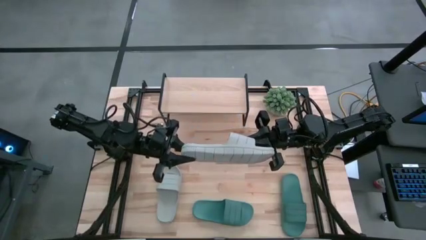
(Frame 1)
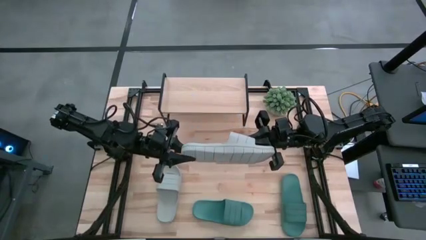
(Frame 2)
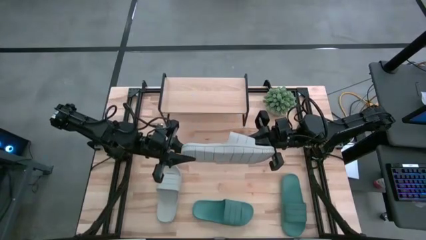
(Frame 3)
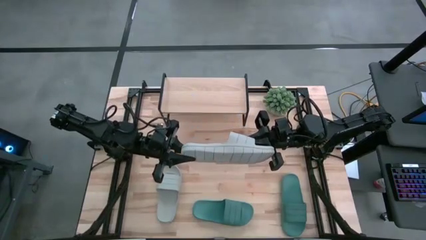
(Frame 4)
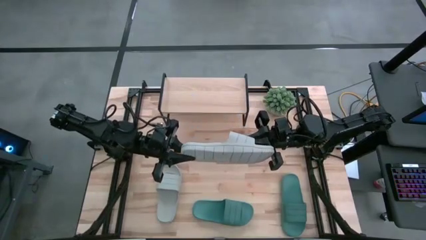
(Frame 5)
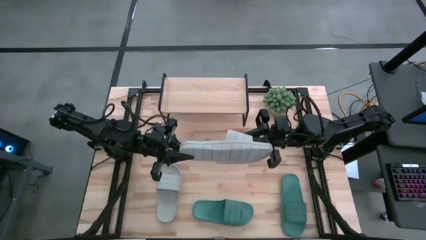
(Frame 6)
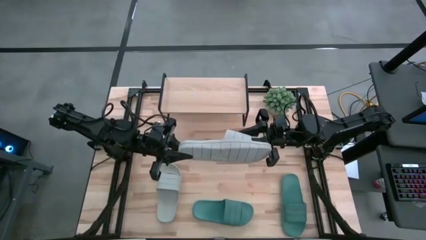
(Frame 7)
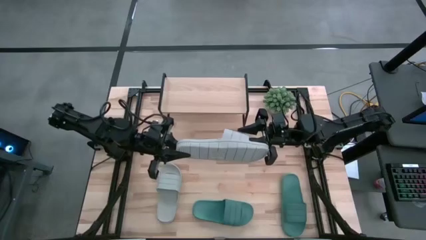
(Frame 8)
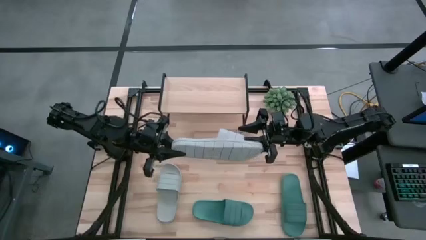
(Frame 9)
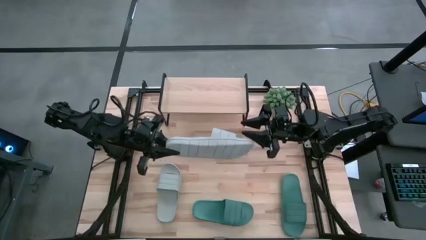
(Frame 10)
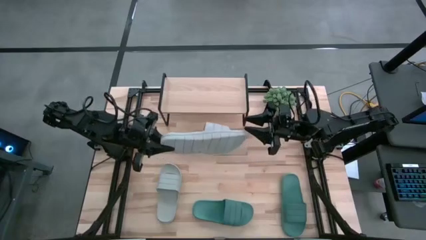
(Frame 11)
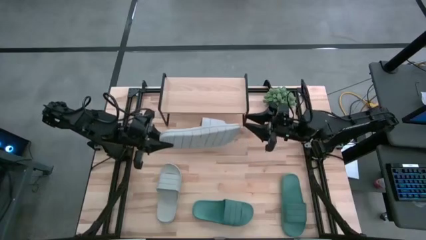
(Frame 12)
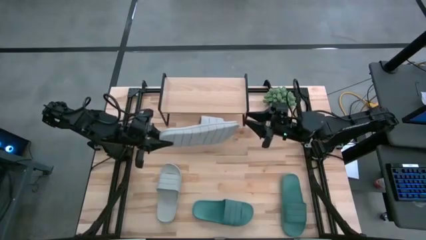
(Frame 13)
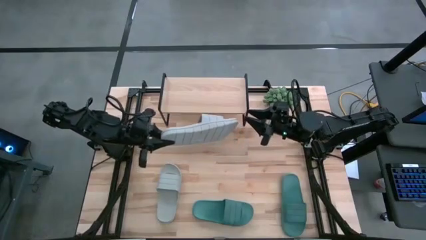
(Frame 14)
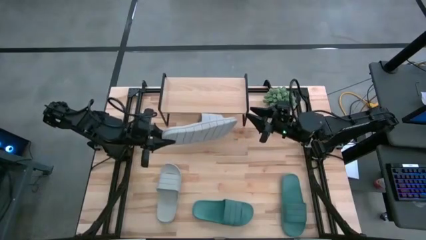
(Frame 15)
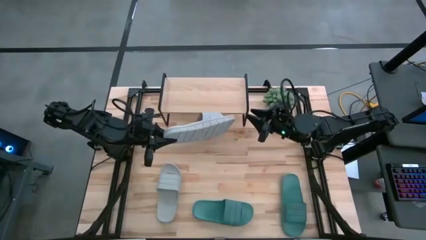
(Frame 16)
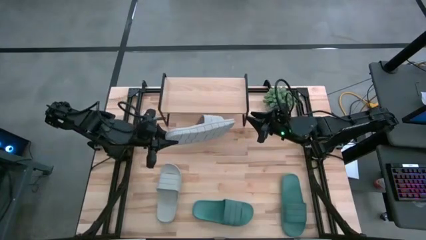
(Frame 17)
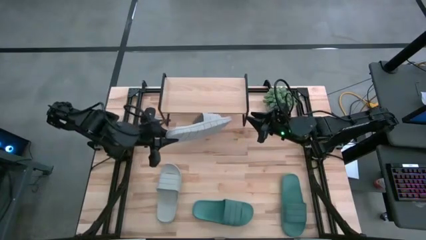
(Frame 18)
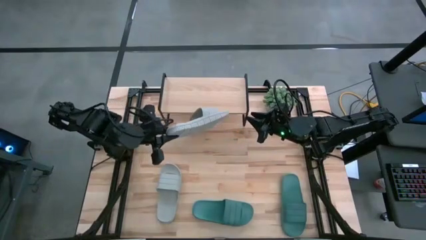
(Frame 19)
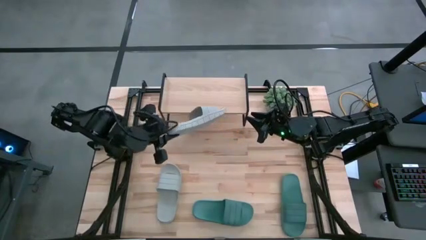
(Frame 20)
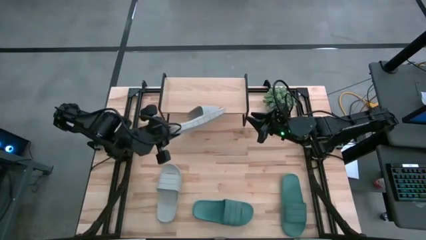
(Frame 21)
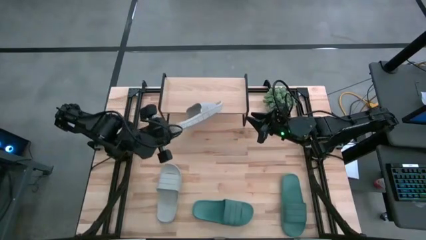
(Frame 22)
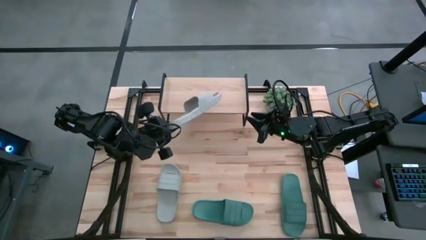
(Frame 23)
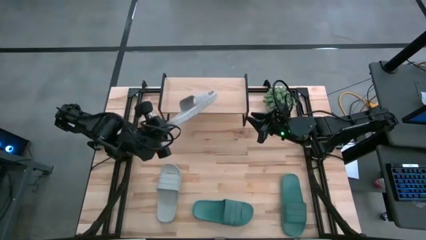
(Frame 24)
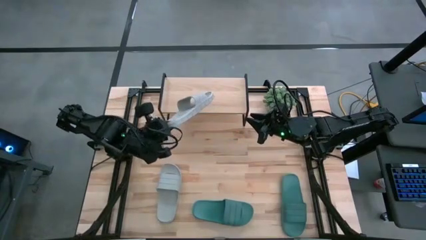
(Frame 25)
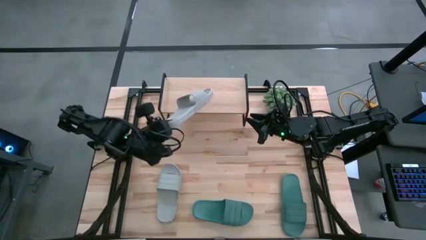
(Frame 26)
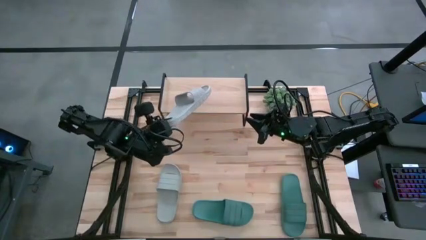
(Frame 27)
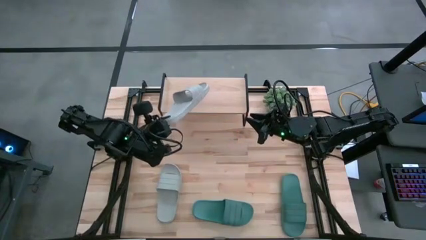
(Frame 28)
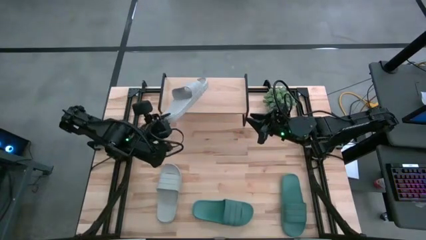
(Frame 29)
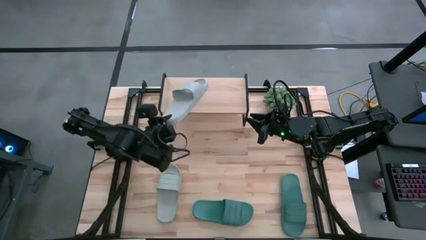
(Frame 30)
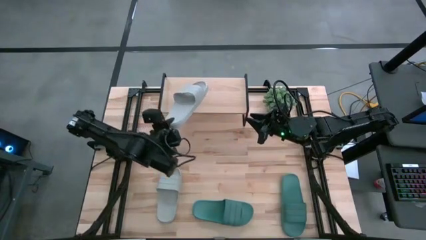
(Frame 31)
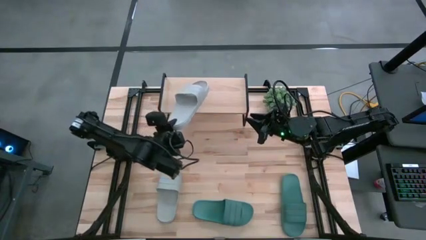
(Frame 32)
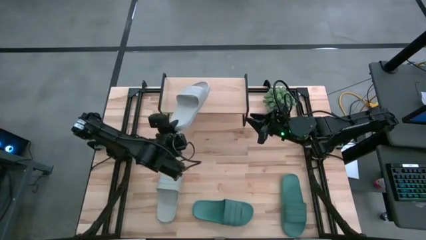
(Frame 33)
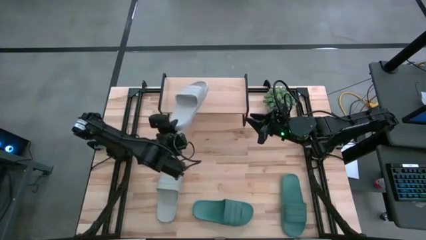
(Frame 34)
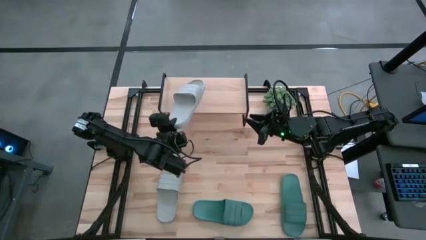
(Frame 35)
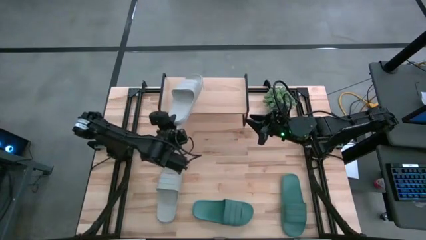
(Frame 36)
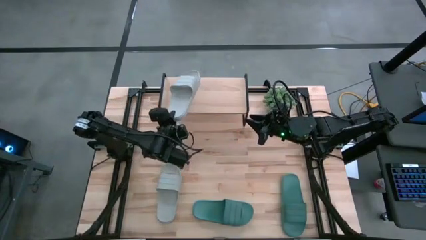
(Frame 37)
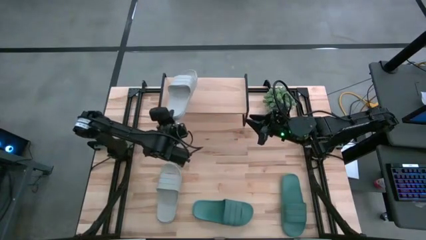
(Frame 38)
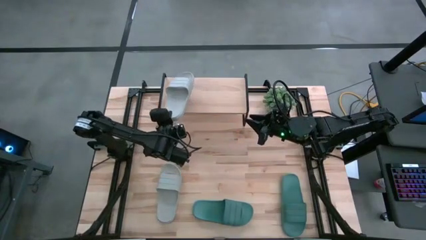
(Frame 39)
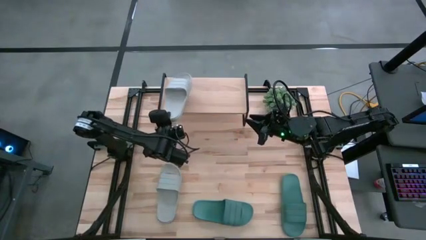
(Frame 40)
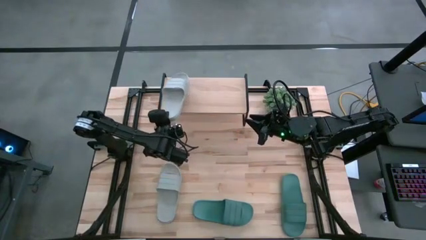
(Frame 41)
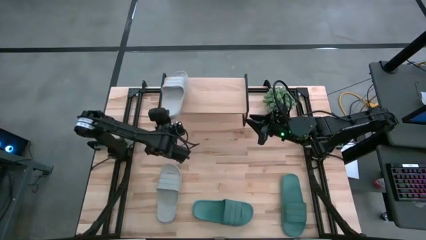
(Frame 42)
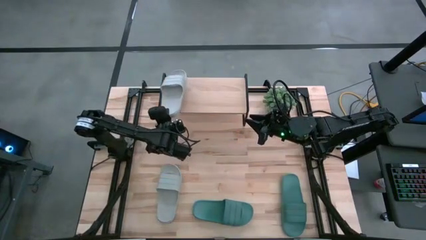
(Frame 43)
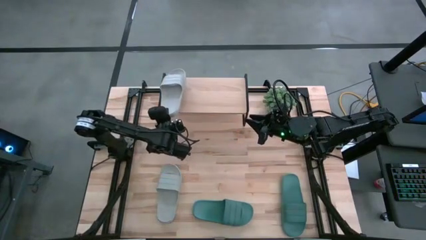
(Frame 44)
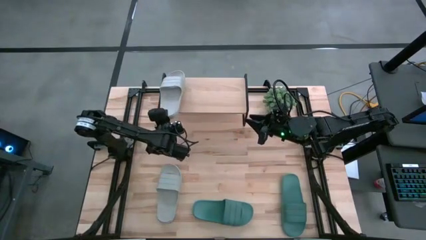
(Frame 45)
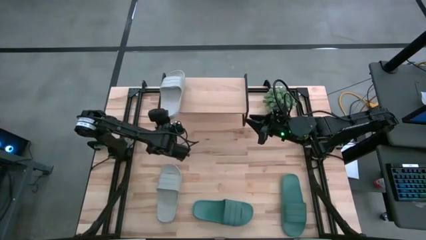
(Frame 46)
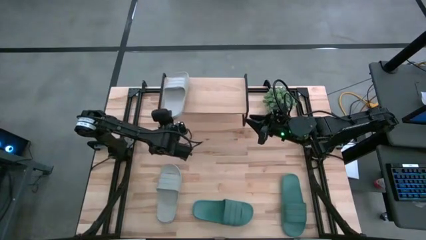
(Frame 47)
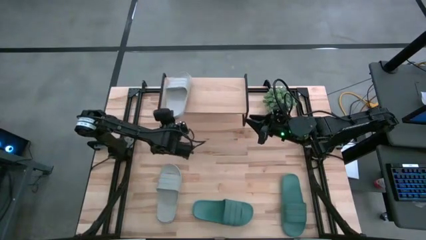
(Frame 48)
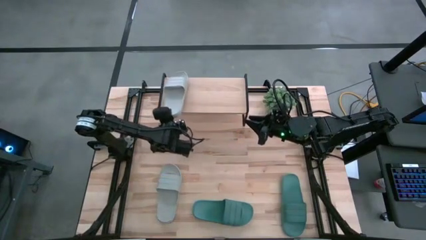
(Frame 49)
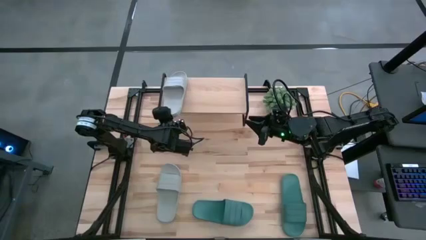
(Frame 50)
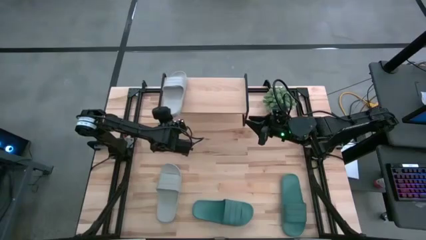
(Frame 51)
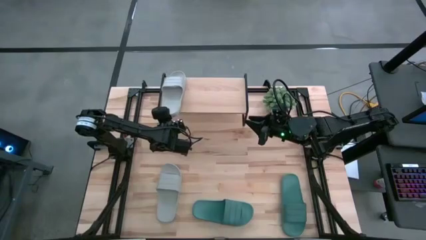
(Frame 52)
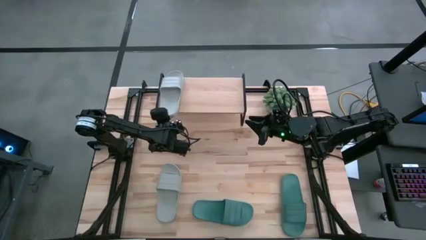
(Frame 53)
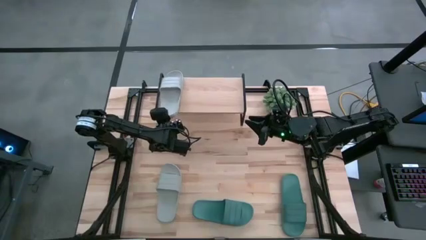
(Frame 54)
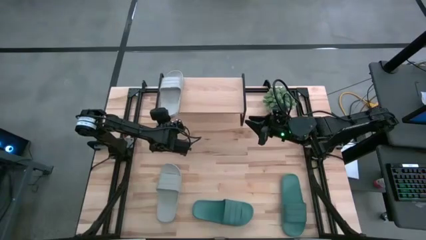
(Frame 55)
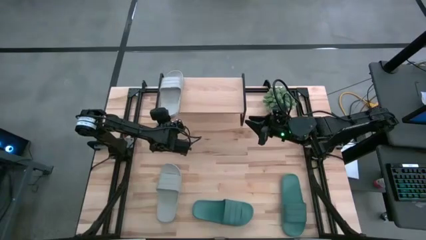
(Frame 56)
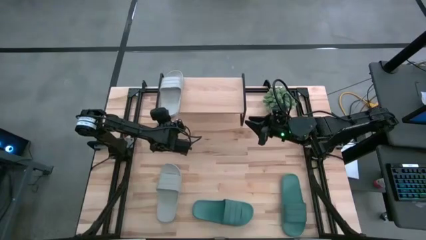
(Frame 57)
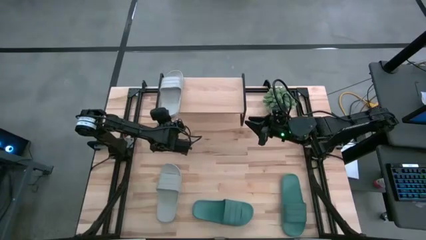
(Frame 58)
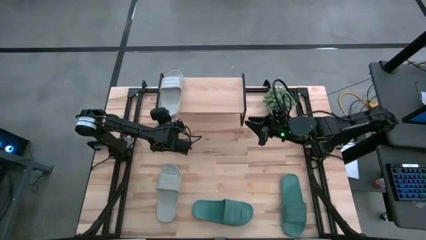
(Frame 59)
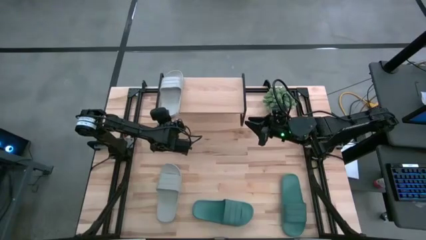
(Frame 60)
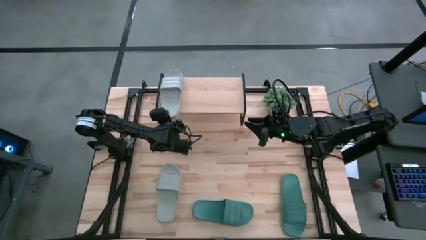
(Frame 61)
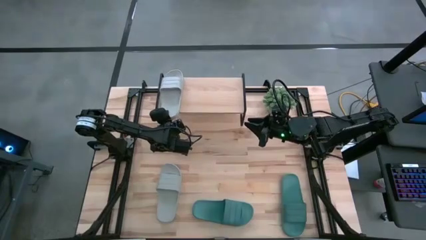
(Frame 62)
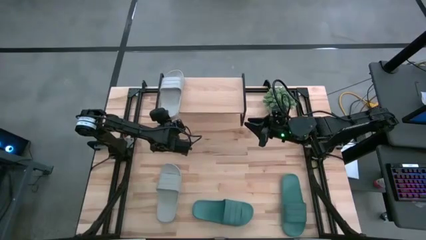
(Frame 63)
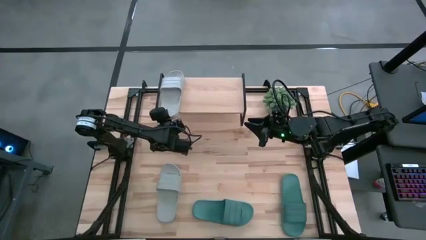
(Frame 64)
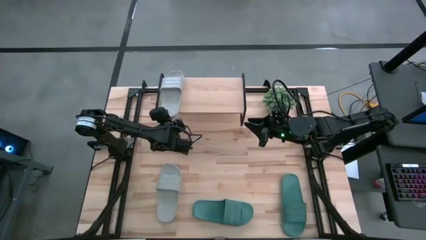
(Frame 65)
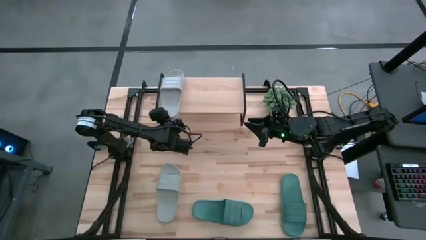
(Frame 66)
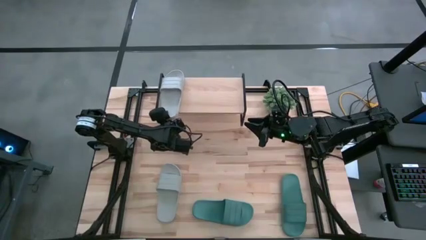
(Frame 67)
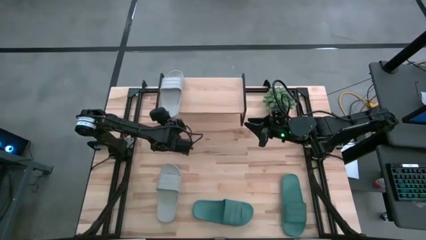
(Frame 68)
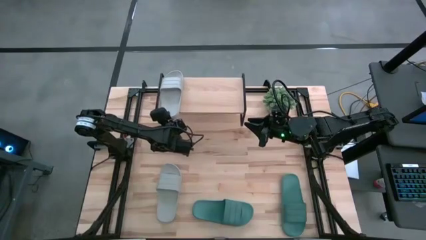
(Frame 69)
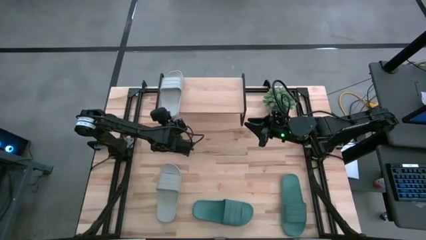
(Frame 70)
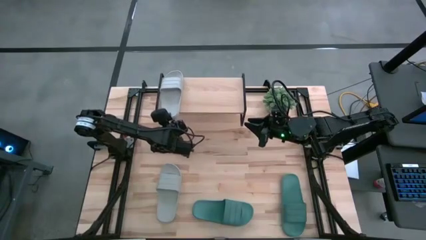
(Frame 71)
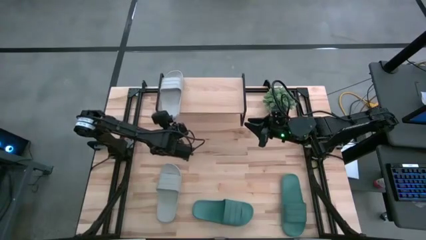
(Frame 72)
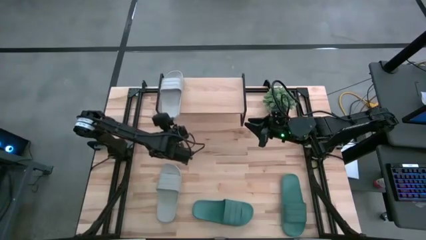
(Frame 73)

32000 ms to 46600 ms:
Task: Pick and place slides into the shelf
Put the right gray slipper on the shelf
